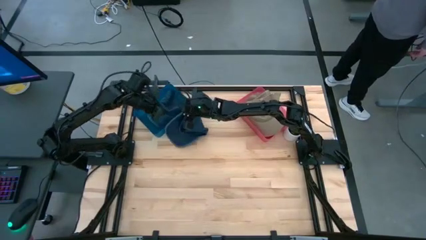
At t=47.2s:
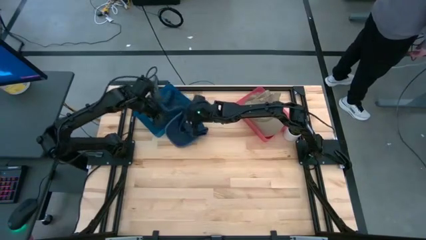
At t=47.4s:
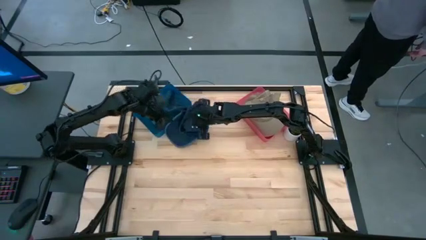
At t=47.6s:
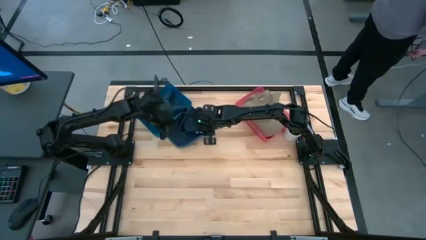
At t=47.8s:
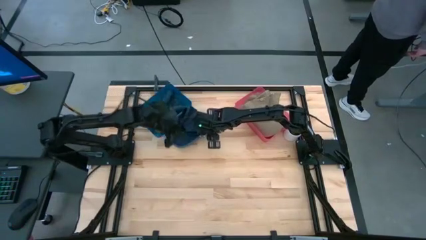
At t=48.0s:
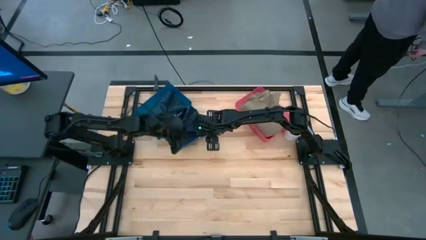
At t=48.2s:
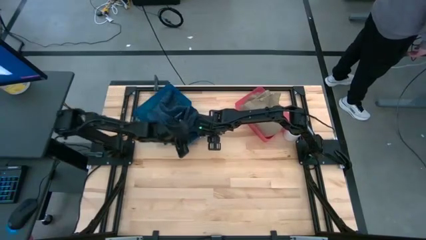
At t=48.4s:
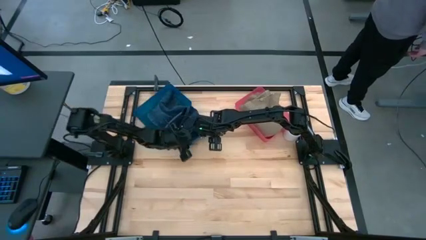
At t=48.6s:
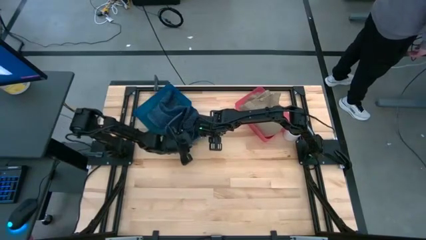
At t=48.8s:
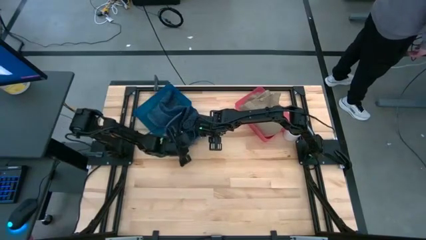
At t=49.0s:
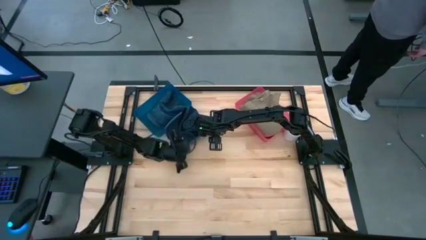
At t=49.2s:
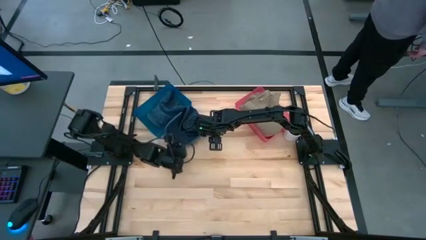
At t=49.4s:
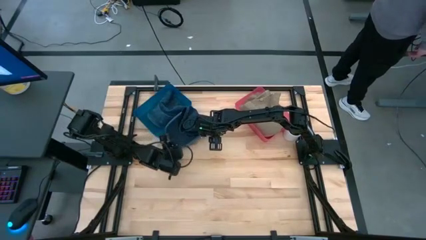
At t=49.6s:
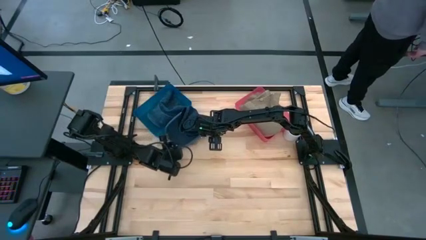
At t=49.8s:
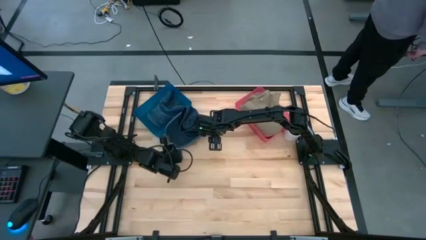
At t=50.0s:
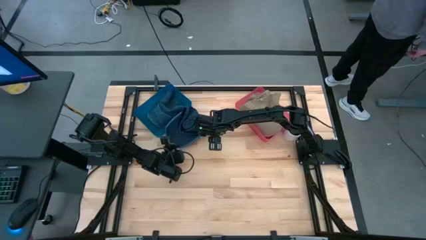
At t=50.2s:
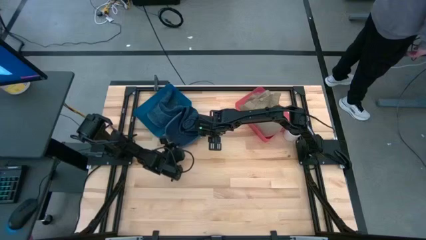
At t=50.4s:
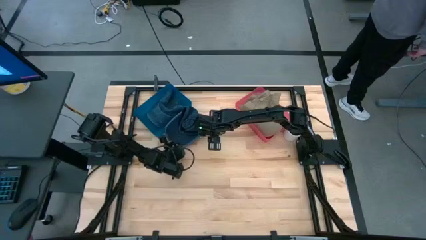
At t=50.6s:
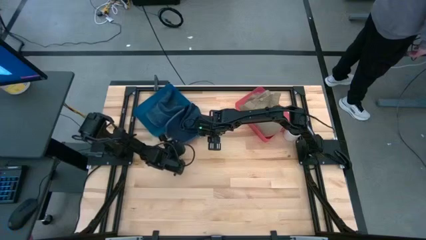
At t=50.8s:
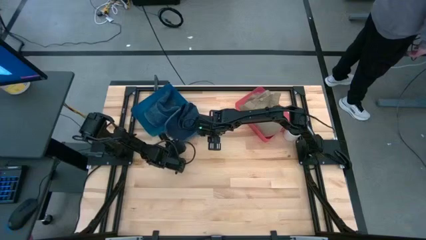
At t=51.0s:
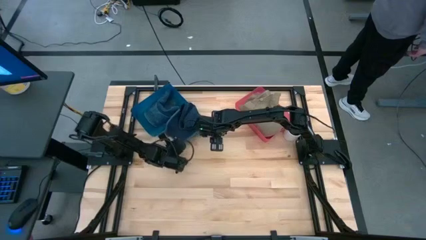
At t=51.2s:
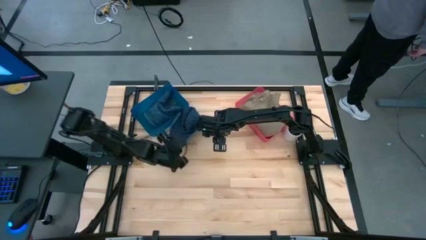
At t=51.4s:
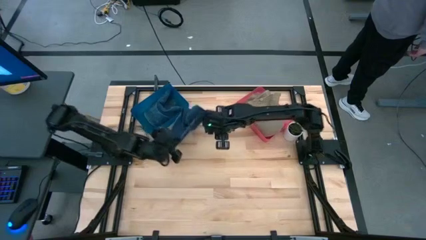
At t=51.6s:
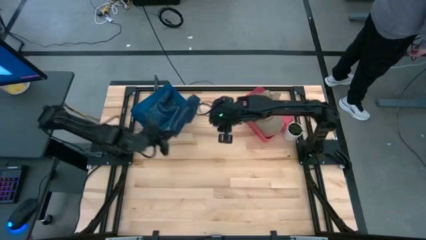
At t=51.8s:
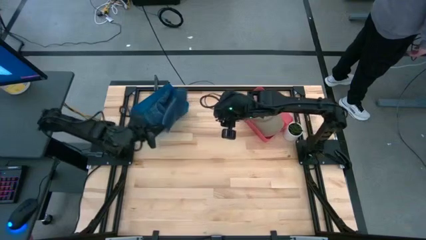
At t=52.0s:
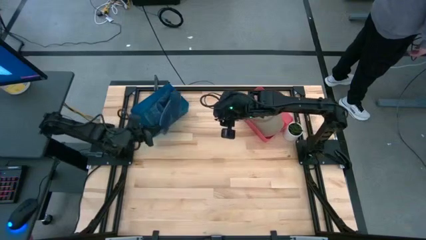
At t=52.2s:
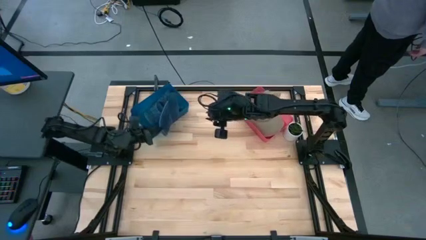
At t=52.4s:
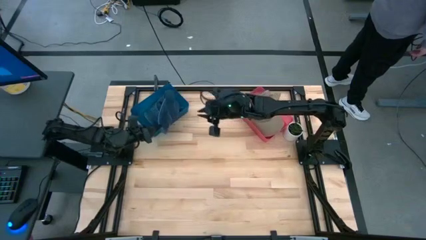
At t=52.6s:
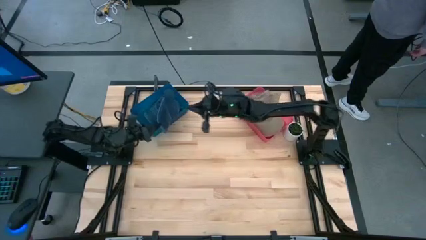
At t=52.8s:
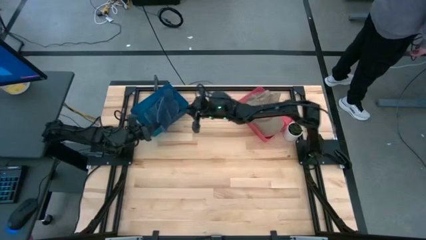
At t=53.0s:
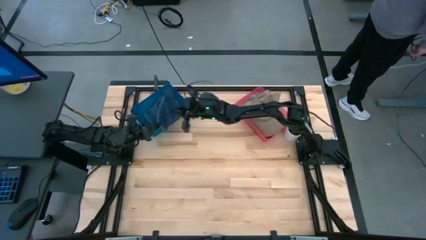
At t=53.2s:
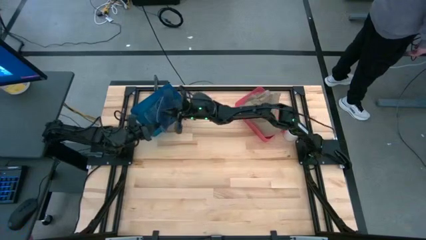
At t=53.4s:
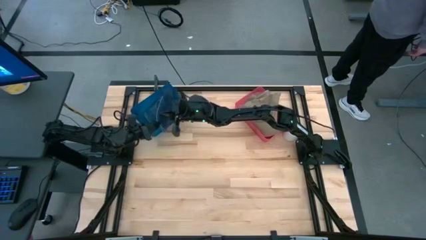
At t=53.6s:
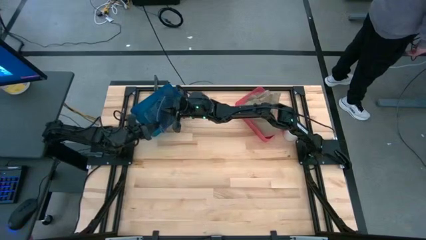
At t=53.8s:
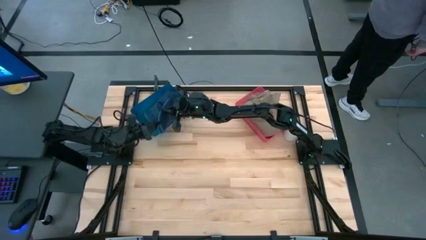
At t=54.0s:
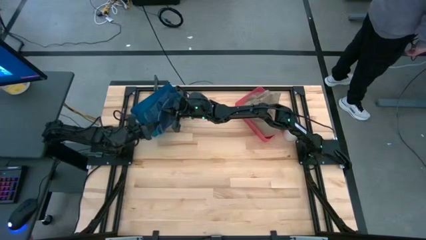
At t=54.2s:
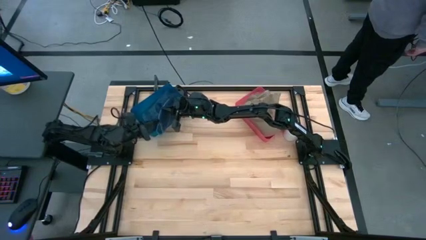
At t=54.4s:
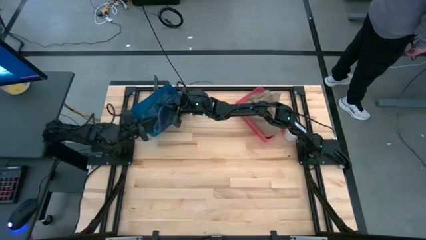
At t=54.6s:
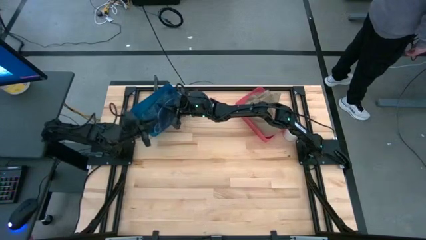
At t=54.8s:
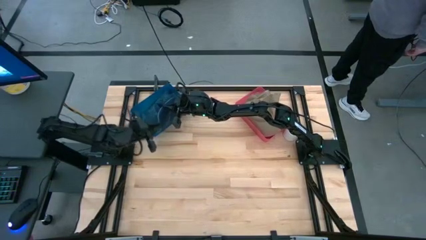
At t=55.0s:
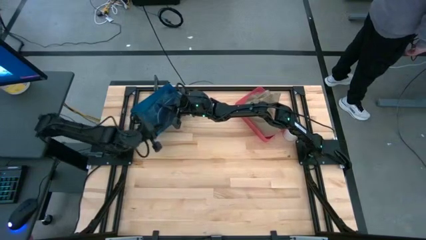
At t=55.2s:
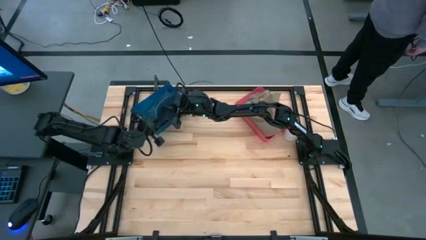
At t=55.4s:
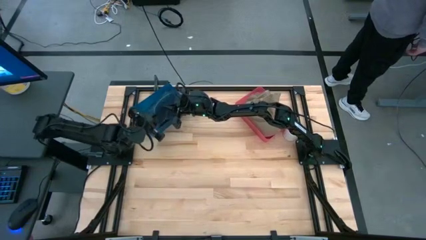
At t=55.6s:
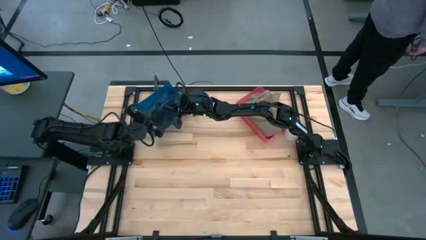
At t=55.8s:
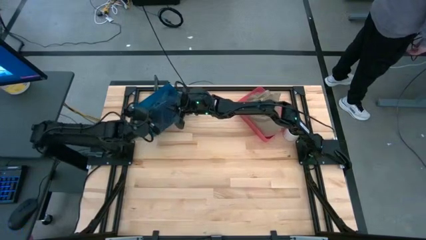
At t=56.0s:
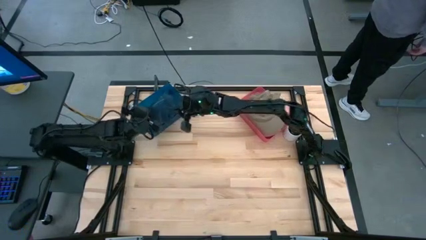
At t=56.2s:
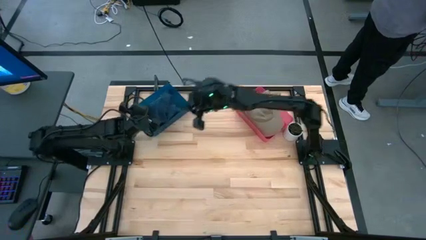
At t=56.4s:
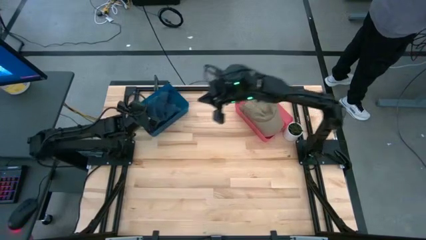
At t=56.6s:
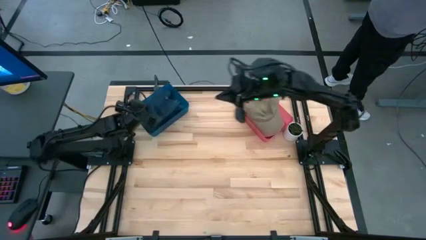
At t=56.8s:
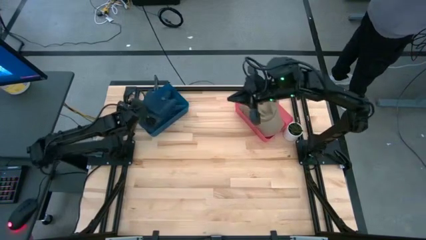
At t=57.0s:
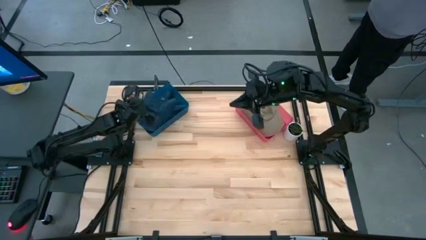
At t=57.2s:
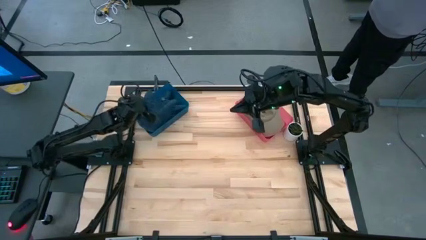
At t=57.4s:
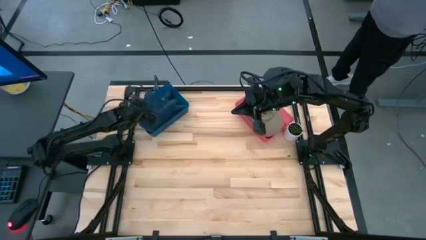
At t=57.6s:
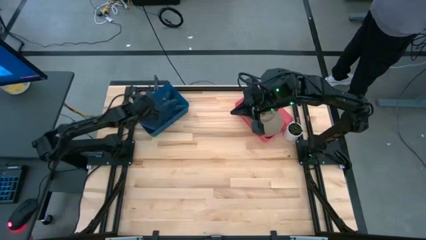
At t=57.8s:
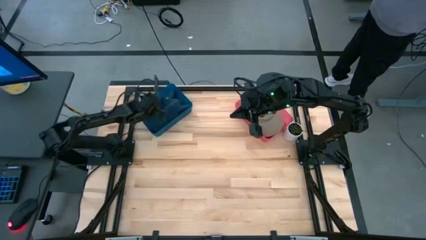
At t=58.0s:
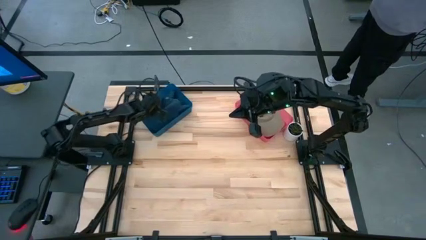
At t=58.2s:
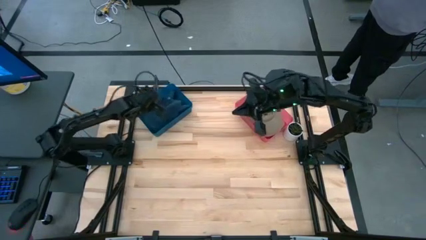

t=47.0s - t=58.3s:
Task: Pick & Place hat
Put the blue cap into the blue bin

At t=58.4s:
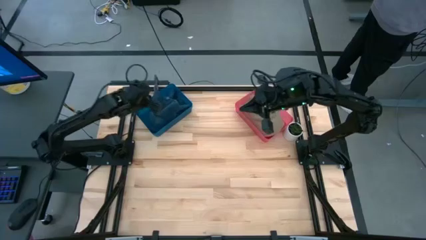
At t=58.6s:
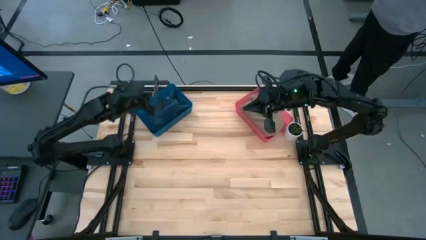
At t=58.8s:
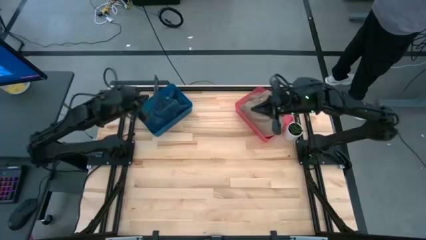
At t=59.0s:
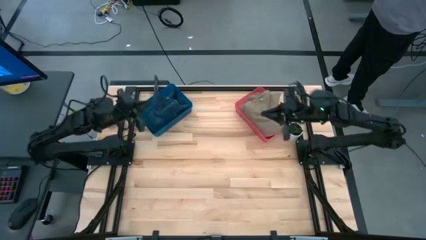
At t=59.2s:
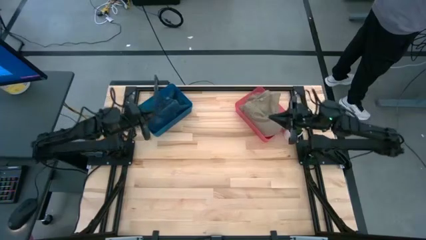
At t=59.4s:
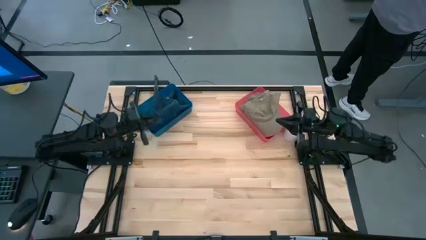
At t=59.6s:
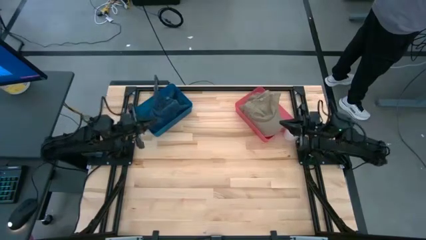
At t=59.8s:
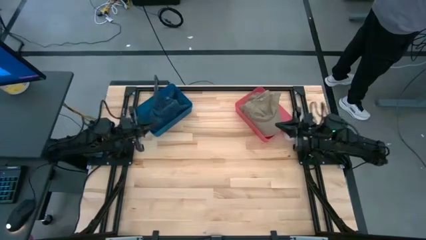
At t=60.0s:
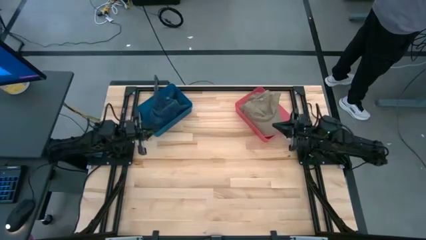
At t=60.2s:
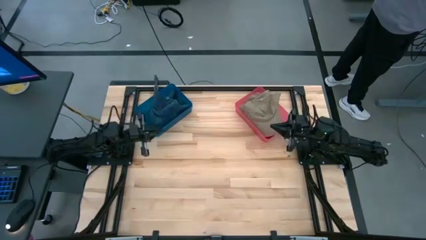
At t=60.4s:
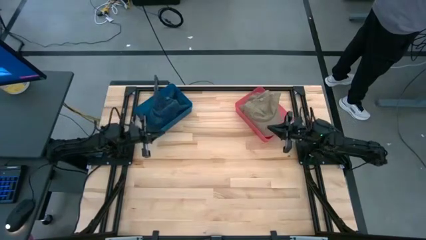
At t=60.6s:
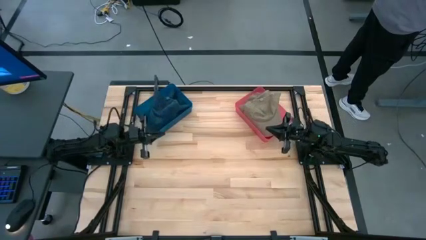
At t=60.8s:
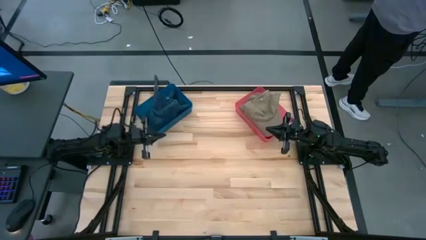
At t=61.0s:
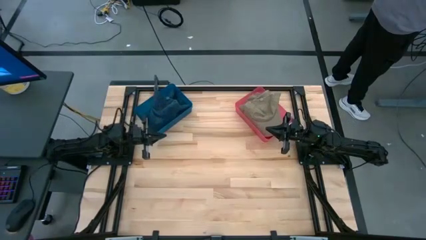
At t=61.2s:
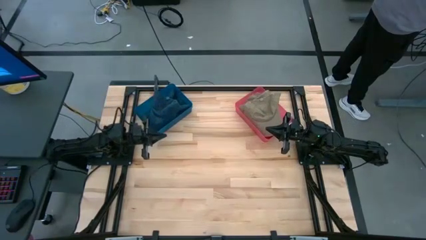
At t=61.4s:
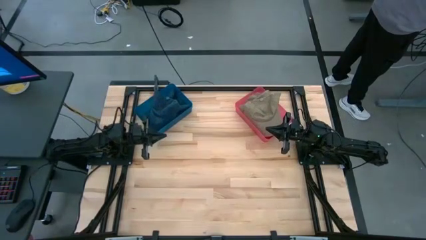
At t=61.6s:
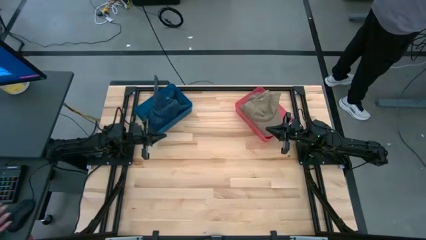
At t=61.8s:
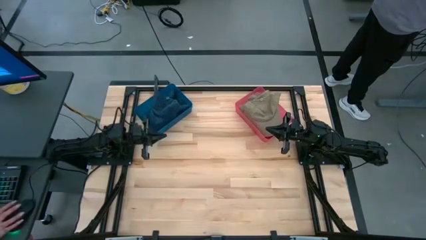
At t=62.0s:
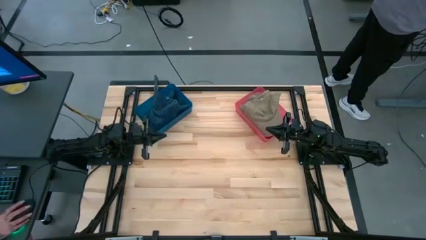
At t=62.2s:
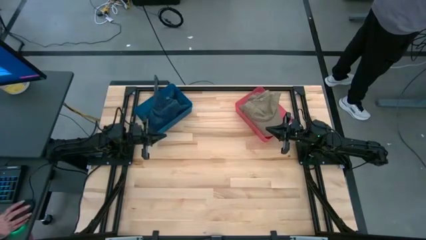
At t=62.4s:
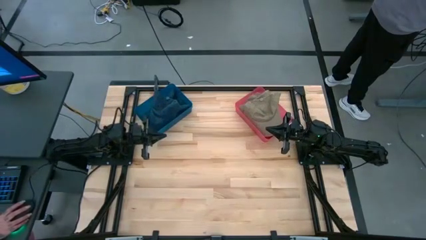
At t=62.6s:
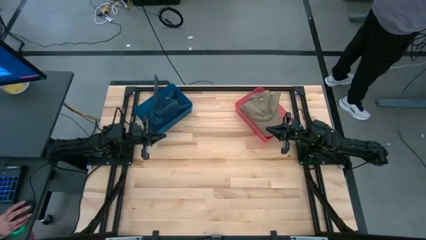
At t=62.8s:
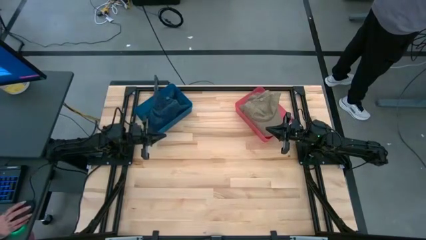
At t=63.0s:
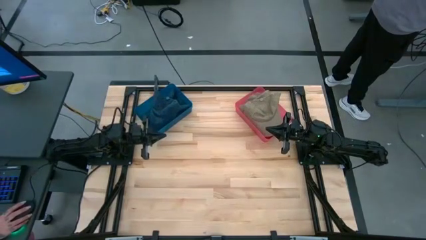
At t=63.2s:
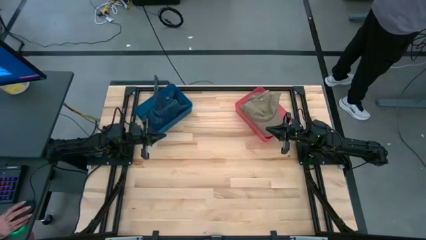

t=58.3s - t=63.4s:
Return to Home Position
